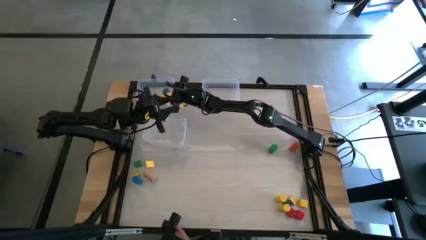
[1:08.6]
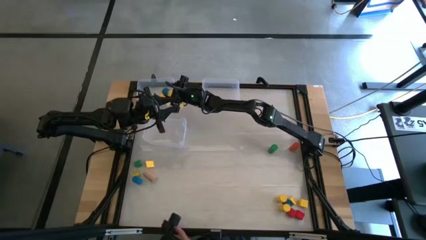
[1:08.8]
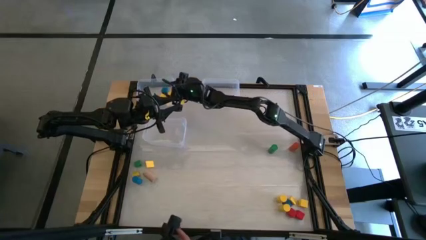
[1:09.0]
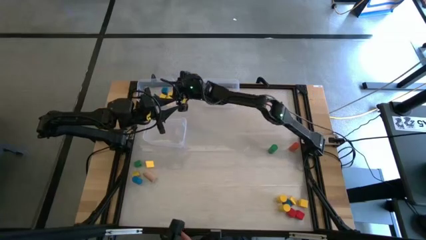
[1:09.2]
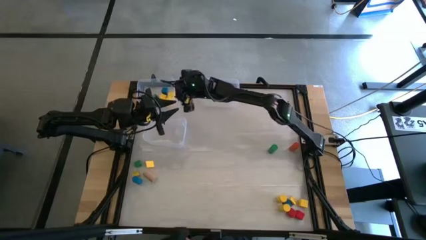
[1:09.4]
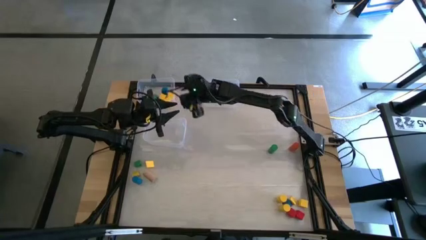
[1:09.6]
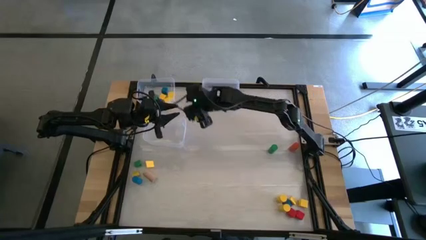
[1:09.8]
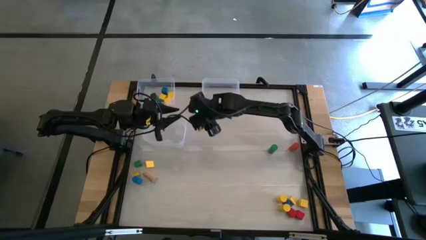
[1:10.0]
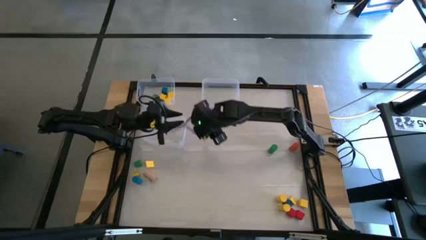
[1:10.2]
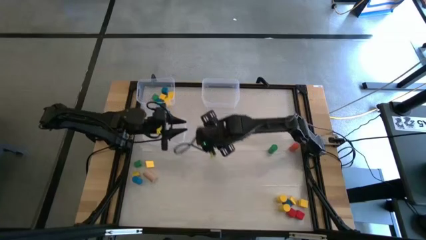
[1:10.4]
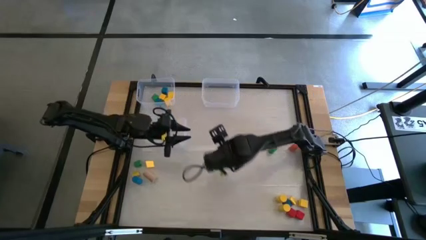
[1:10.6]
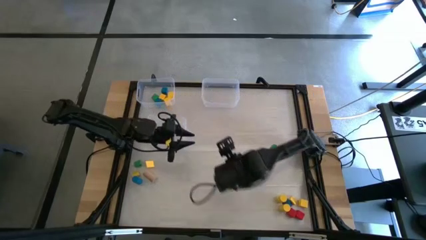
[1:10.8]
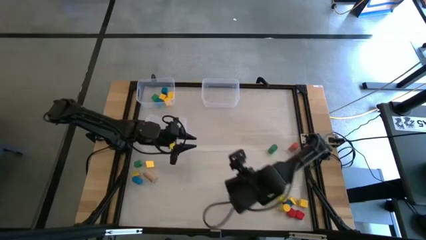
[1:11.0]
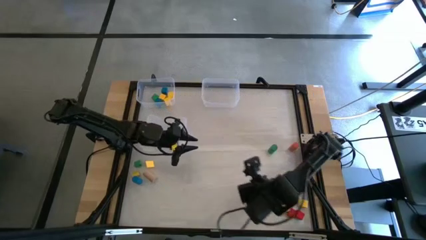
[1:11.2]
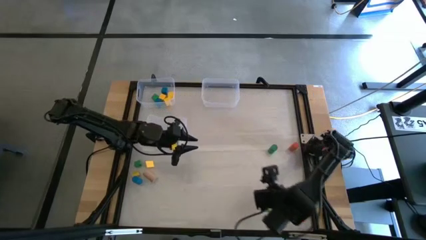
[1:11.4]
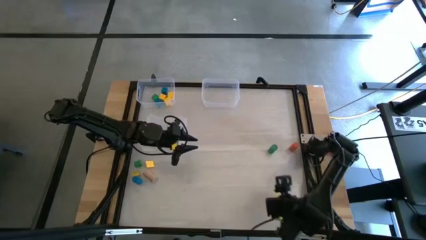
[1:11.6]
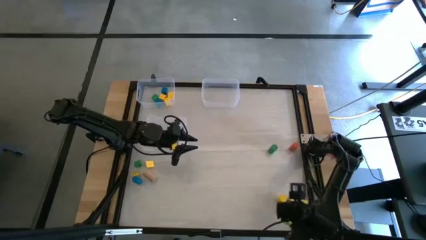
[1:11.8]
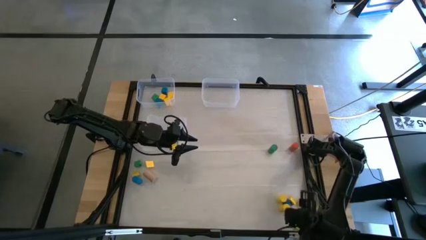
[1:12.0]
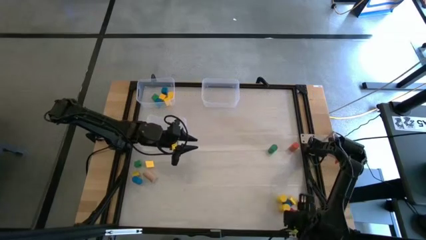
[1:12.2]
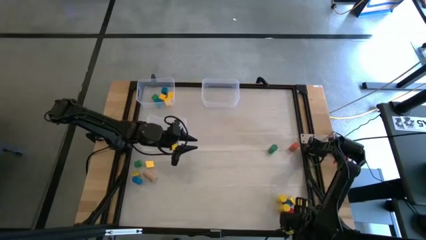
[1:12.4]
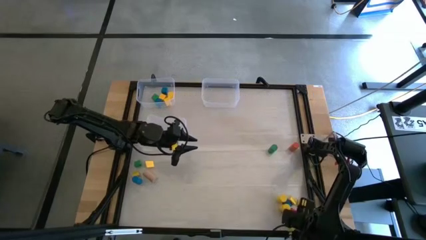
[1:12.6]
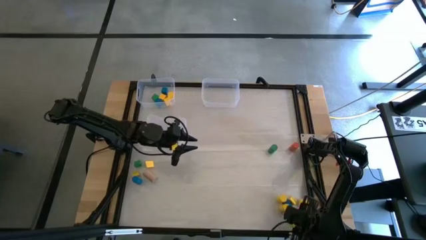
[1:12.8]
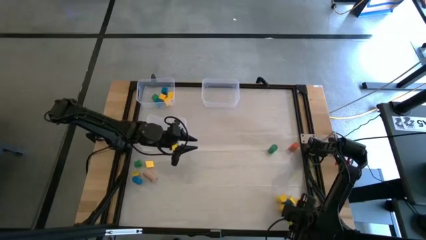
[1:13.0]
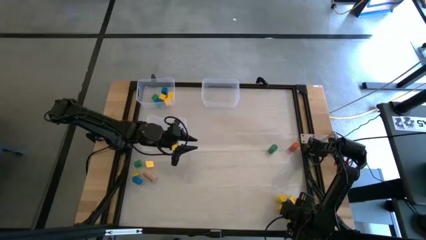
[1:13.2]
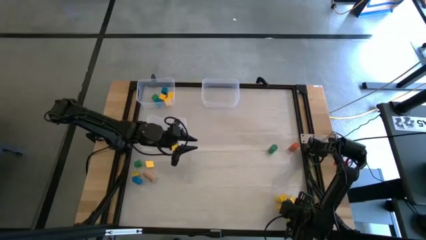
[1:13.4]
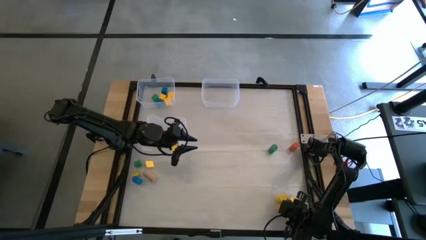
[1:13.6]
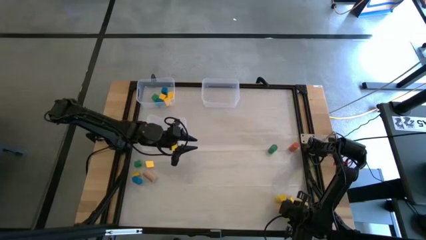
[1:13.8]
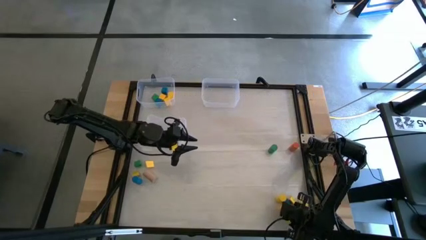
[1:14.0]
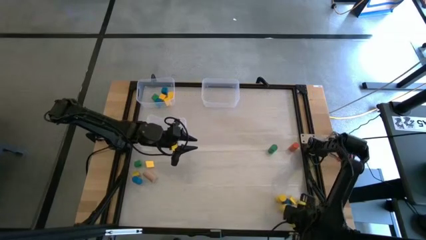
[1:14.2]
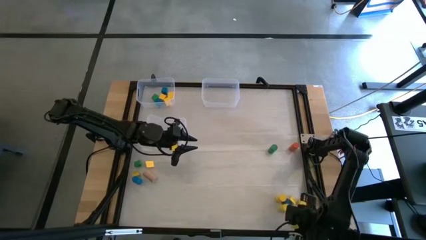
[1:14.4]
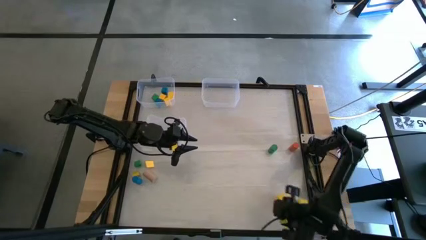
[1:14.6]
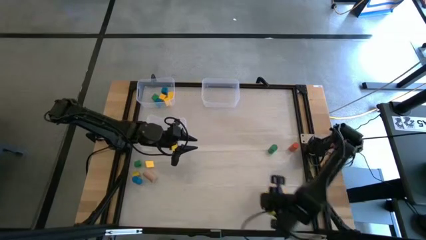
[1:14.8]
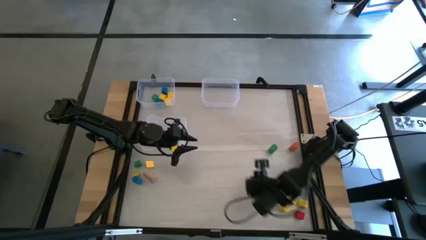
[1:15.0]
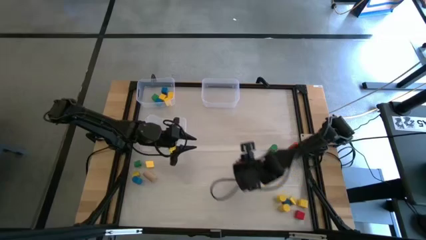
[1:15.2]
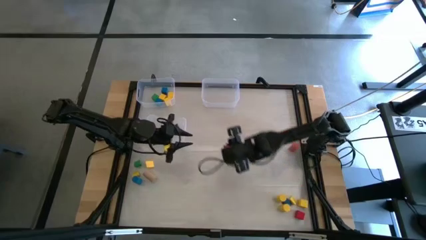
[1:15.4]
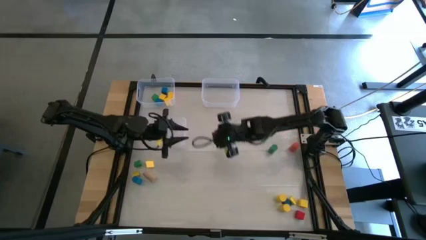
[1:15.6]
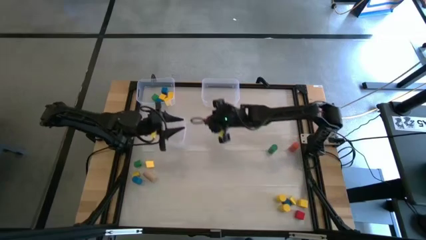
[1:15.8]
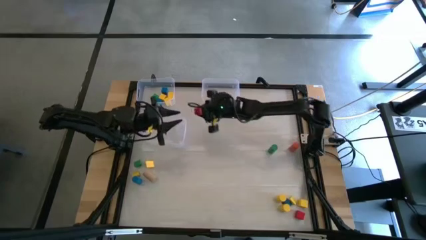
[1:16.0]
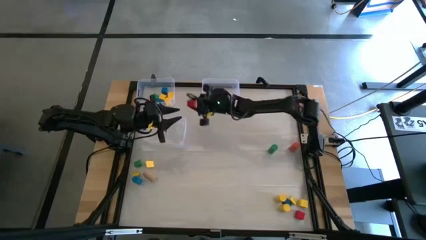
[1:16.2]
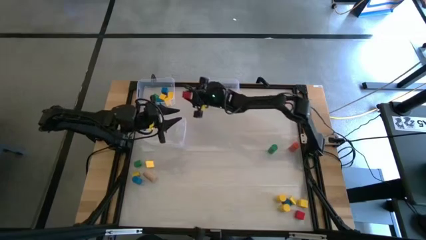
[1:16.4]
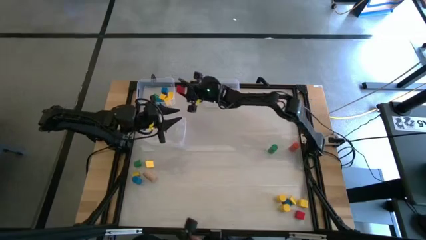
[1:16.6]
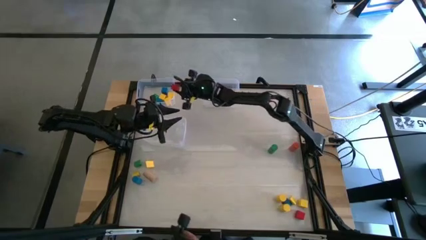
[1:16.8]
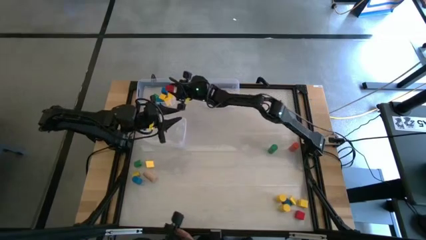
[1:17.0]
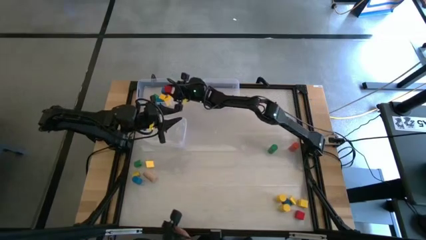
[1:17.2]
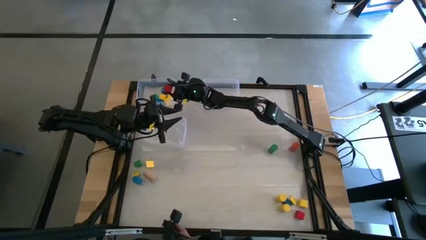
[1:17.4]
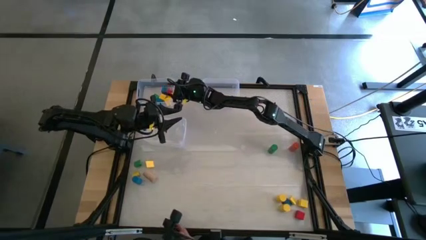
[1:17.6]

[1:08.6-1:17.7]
Task: Sort blocks by size
Put the red square game block into the top left transparent bin

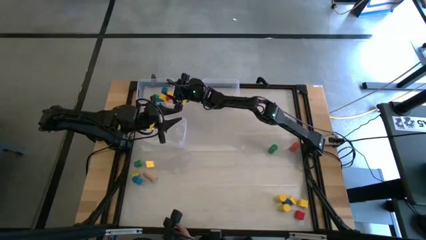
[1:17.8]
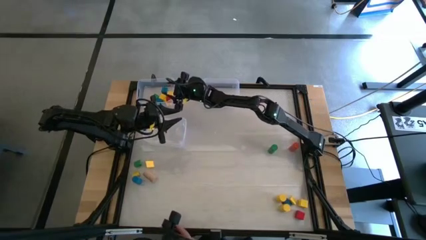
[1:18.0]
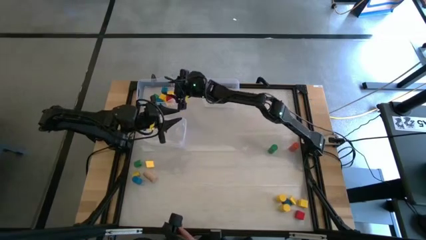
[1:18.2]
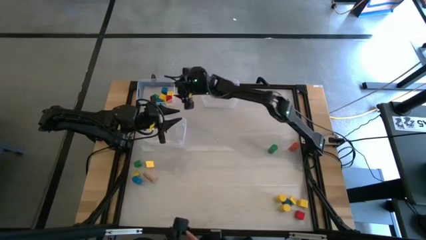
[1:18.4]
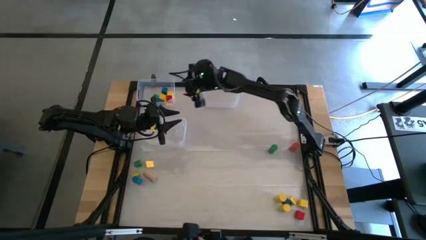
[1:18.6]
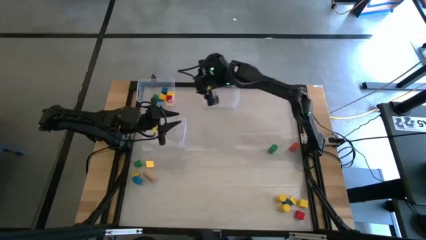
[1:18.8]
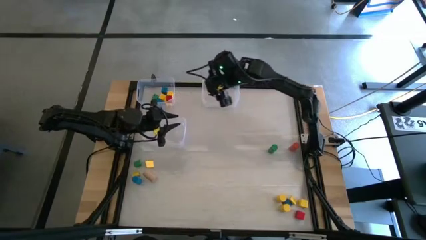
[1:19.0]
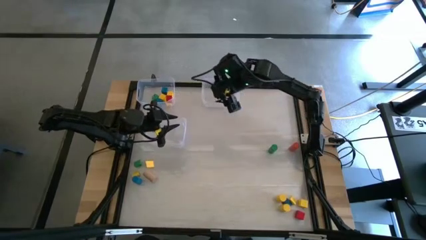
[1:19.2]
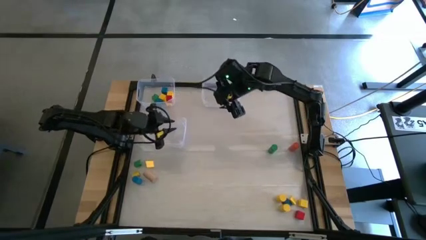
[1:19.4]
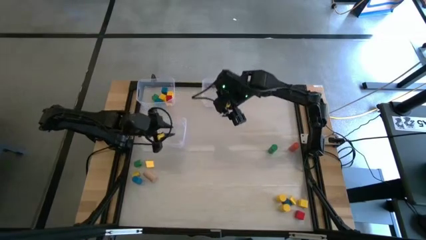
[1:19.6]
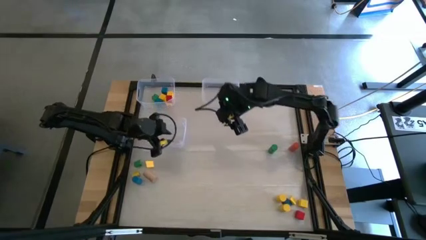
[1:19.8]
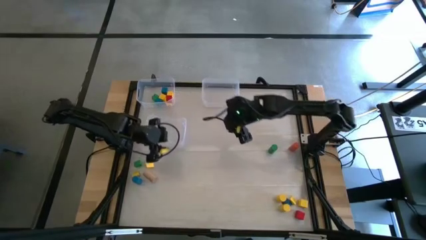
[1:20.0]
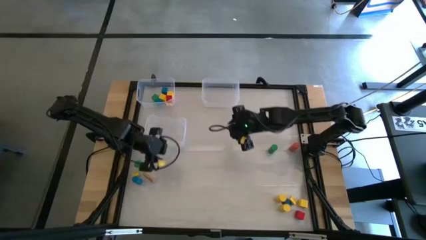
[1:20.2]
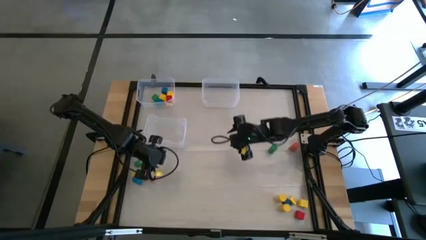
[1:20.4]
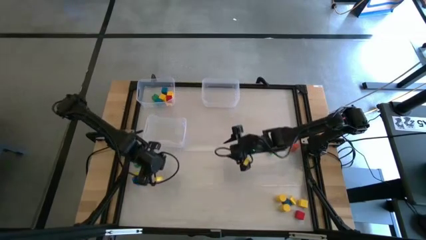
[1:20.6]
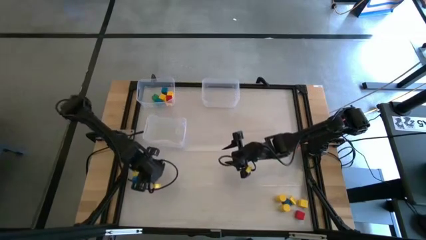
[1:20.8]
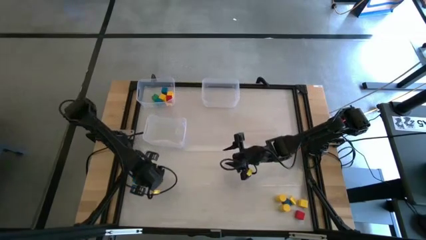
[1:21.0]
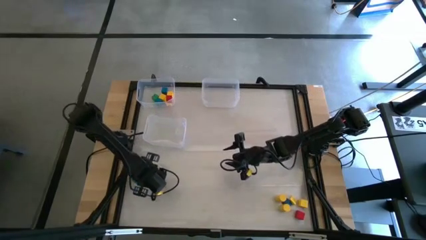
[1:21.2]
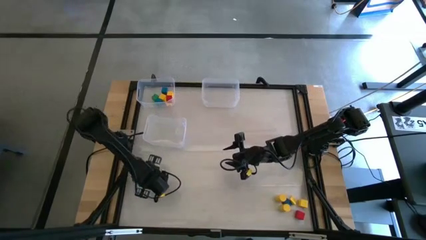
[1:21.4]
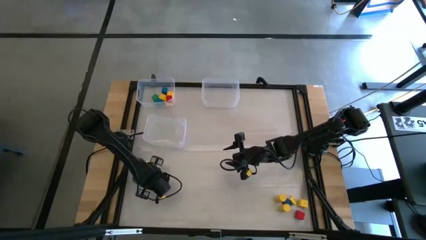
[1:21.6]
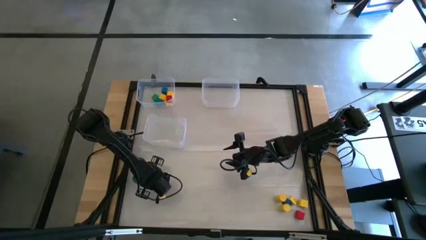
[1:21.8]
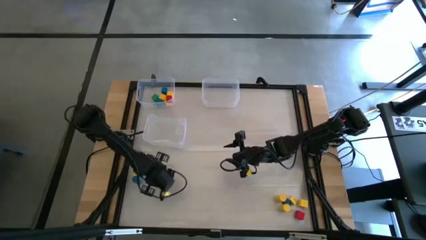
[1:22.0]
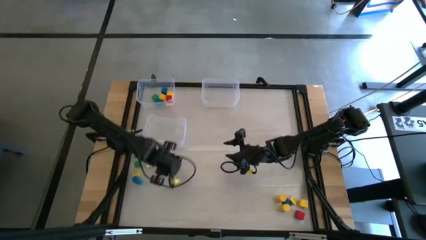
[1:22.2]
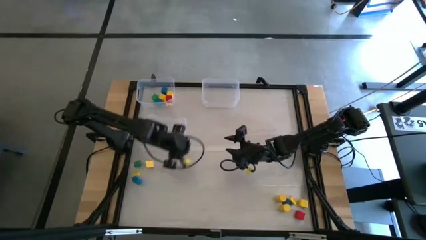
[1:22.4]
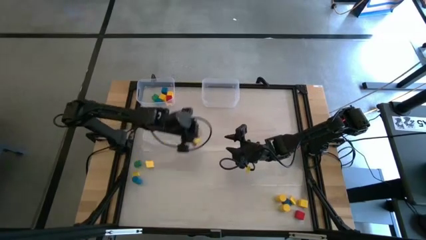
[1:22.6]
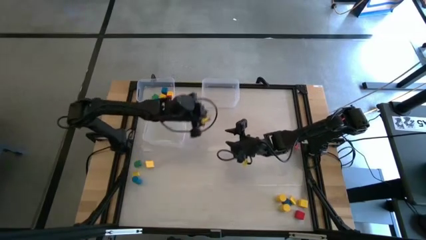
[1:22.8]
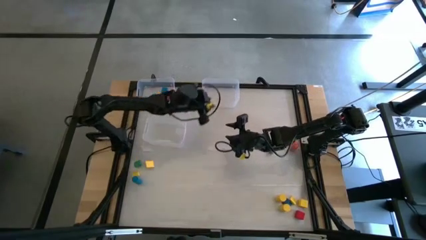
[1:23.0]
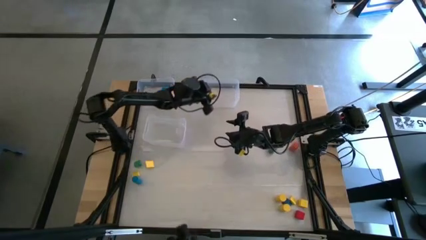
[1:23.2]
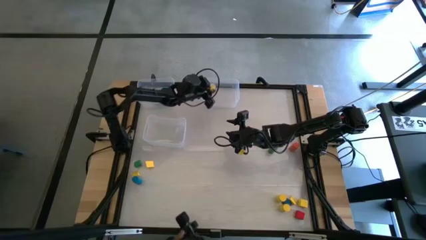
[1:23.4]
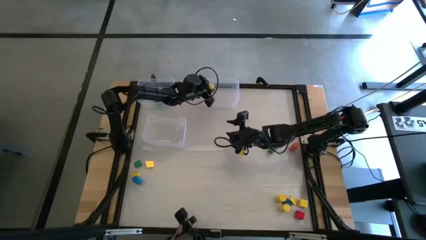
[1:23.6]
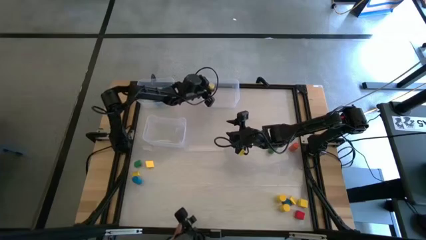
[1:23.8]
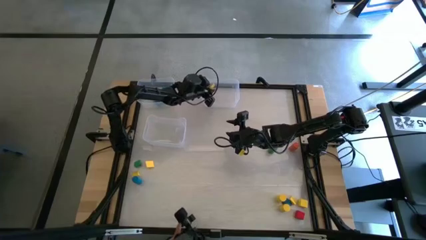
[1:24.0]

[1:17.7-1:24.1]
Put the brown cylinder game block into the top right transparent bin
